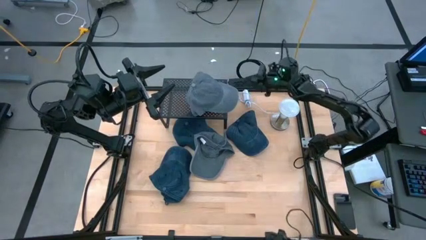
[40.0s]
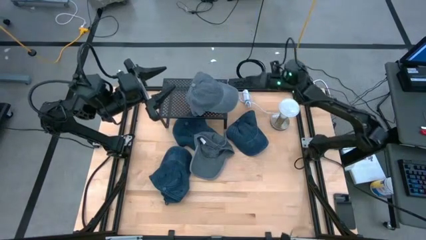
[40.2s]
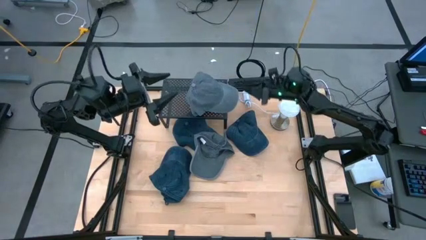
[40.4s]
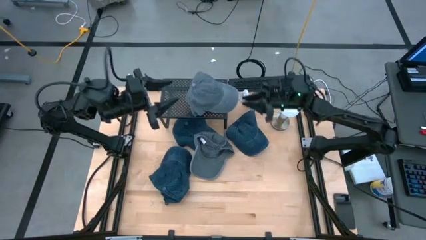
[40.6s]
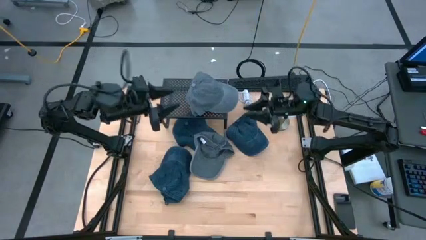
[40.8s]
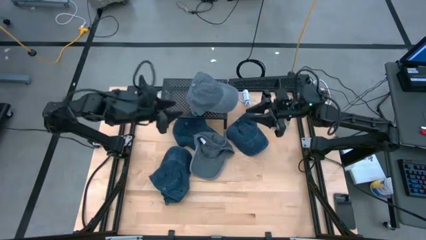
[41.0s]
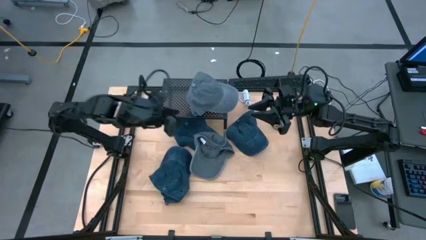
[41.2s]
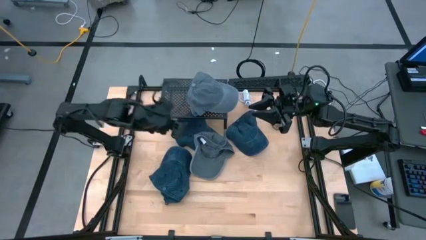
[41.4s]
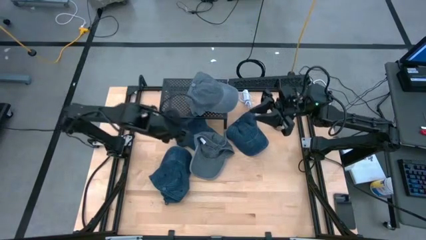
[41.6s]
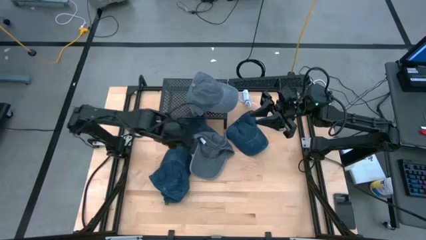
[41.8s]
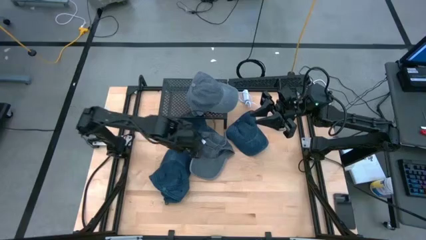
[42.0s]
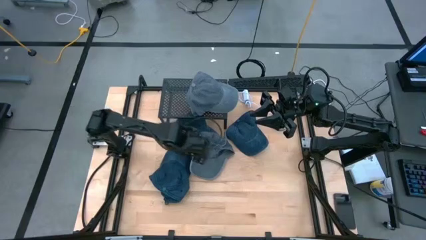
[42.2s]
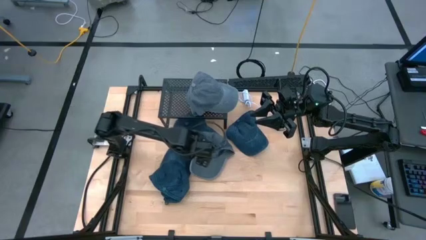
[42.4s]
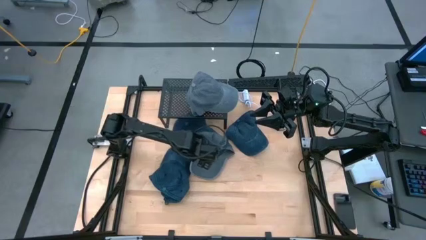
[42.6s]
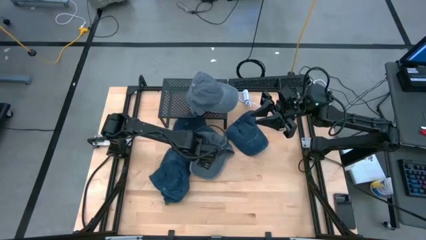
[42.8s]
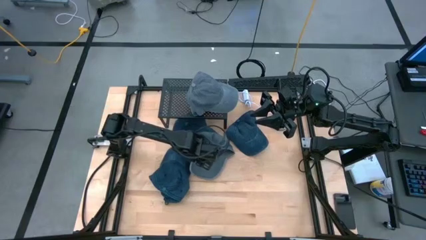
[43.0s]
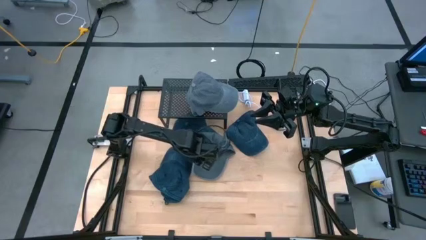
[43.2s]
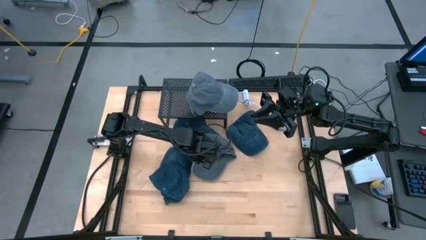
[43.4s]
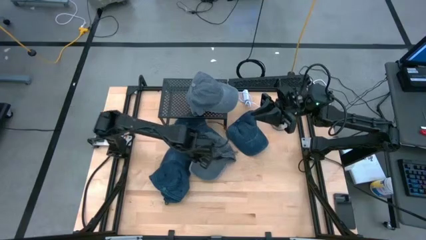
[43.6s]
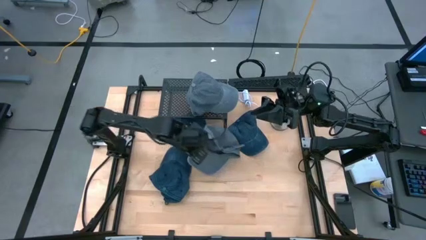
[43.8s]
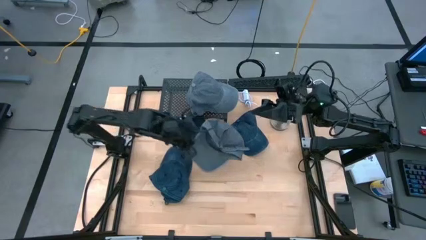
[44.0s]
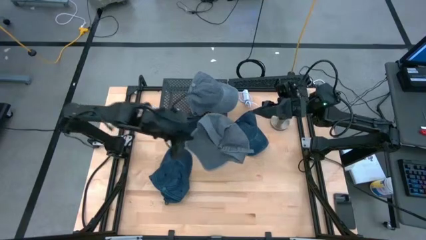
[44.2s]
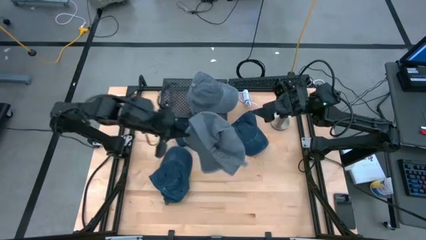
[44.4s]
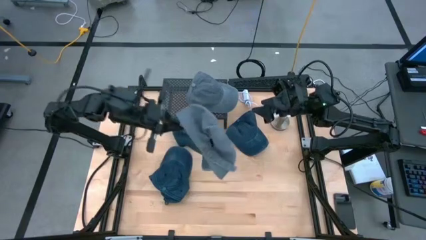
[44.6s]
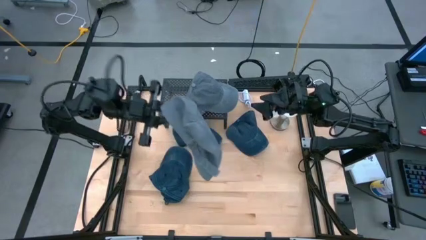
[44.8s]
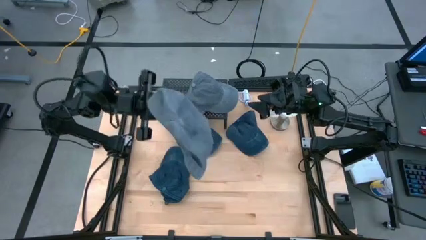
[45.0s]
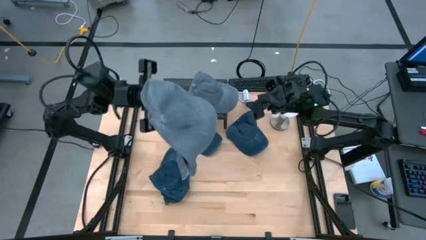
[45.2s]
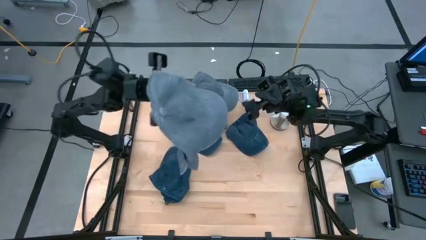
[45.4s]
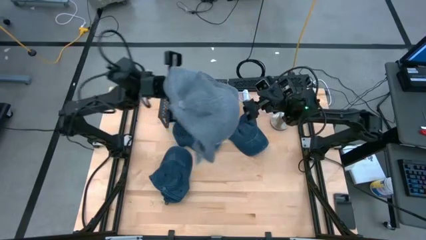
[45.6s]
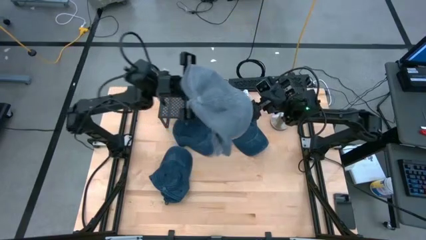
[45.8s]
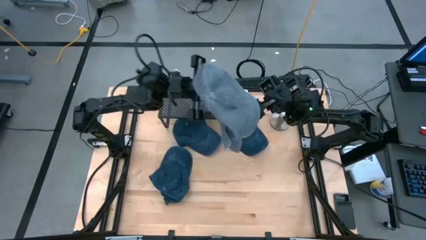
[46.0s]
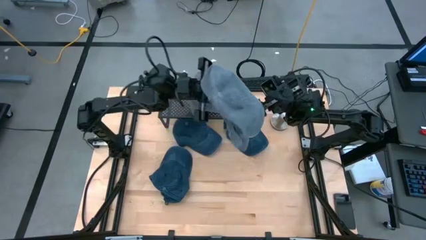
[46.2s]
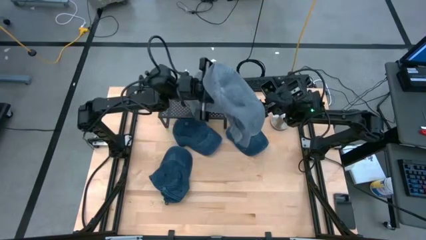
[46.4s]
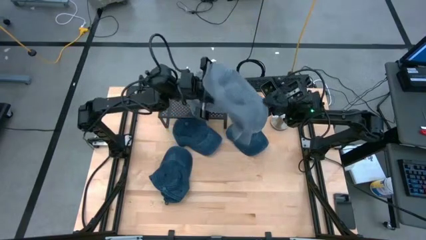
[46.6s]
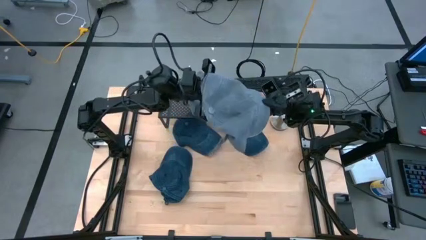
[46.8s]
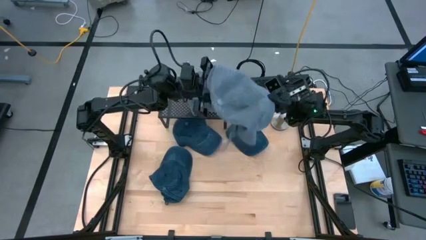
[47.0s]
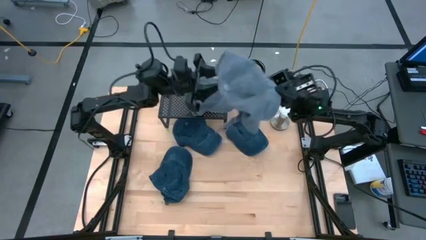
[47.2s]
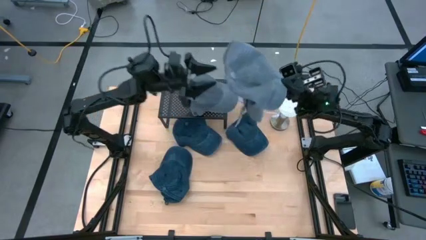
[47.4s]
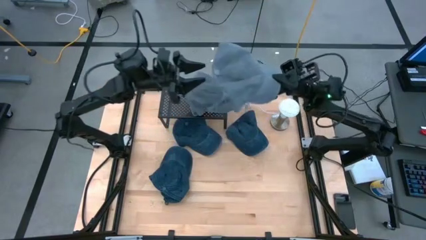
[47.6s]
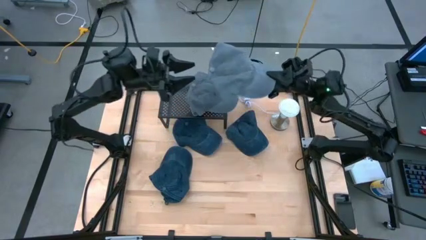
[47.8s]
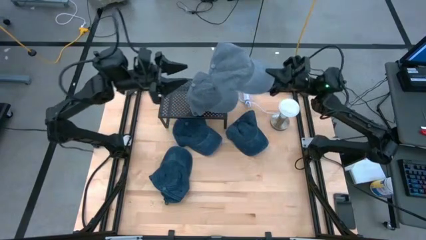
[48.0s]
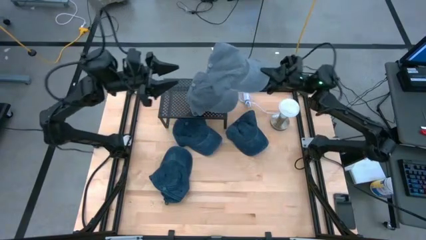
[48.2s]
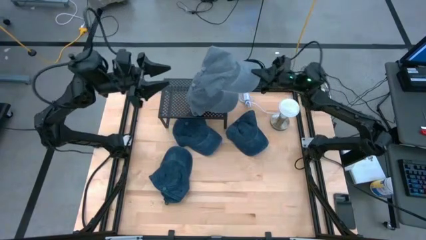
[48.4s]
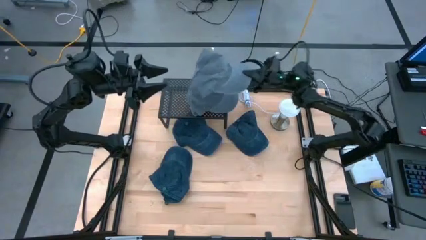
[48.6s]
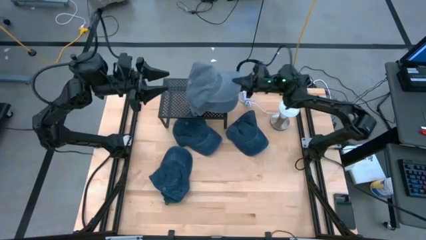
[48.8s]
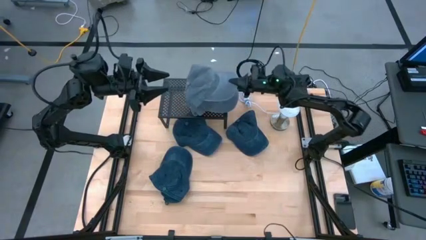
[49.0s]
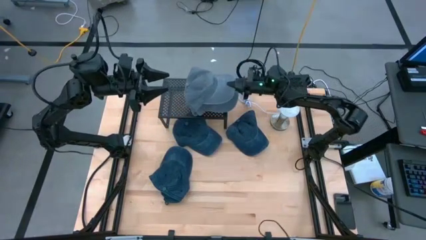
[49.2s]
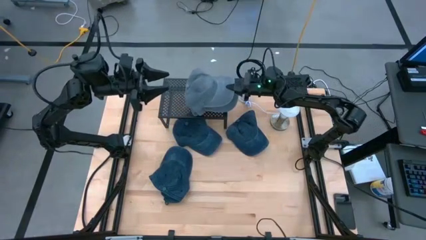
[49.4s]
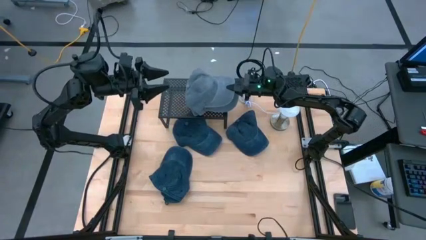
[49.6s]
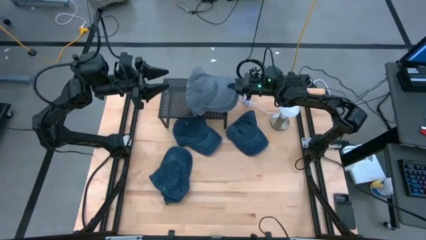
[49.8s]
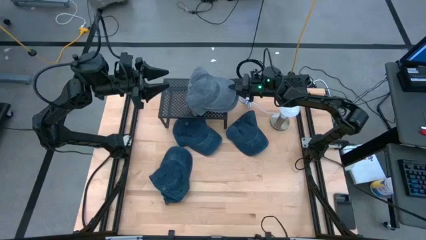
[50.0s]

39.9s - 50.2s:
Task: Pick & Place hat
Stack the right dark gray cap on top of the other dark gray cap on the shelf
